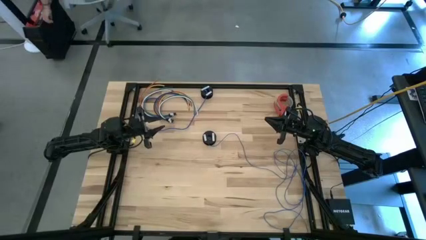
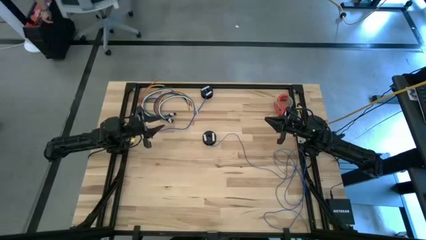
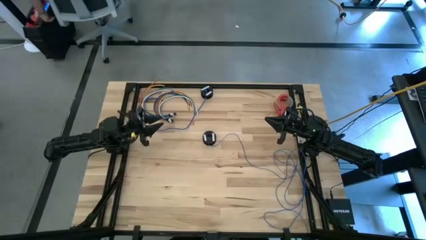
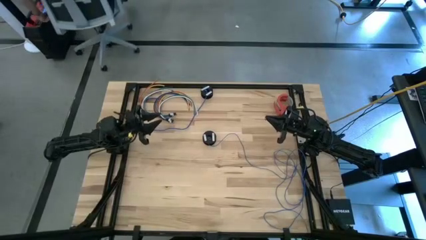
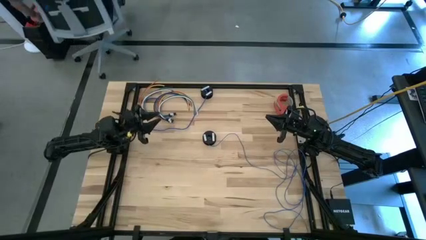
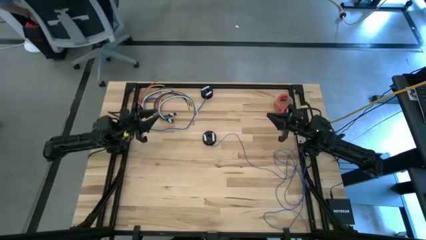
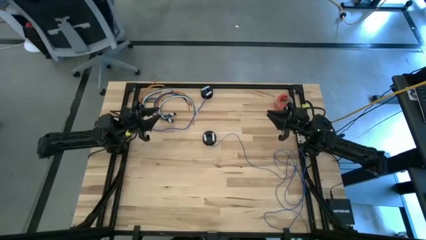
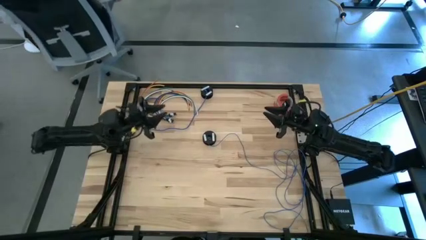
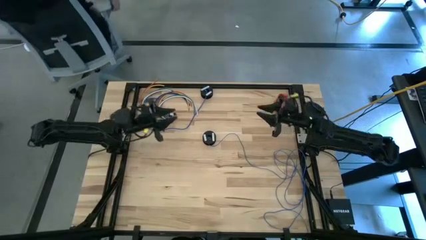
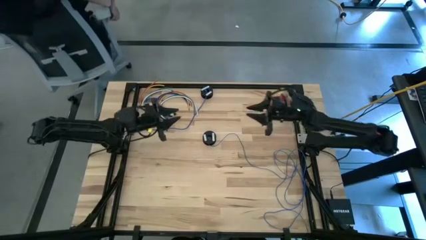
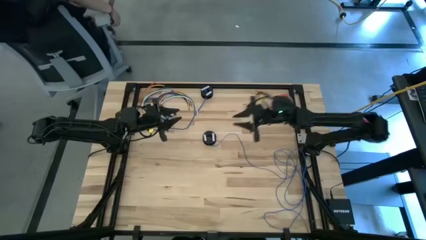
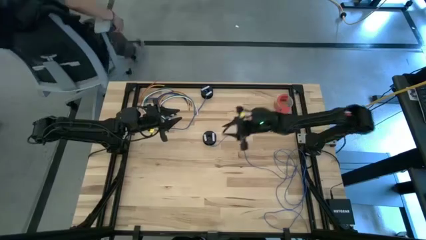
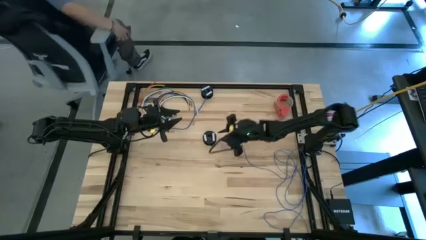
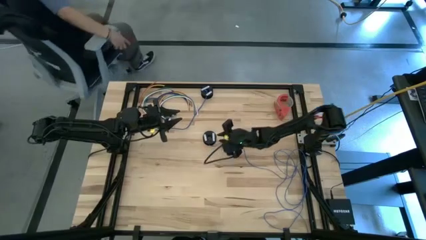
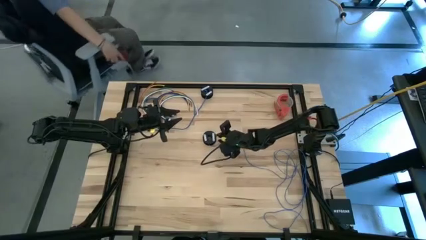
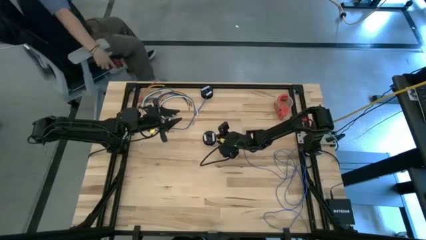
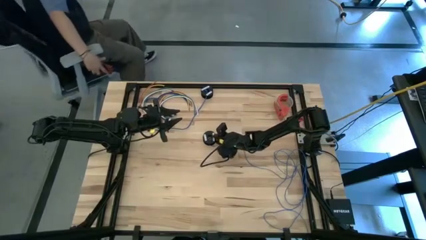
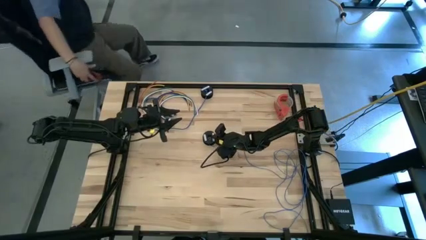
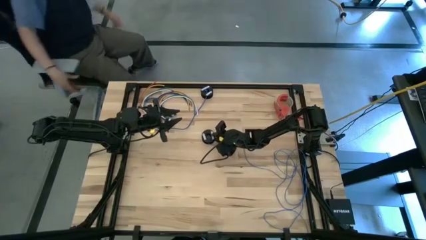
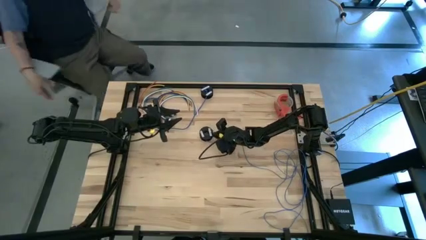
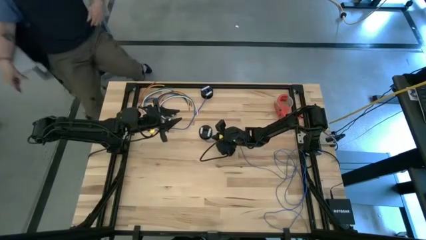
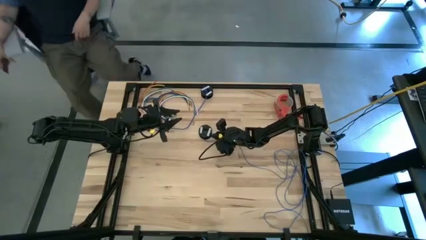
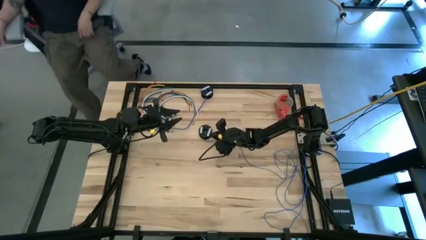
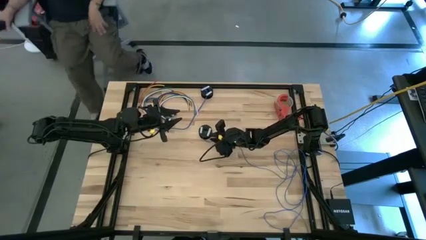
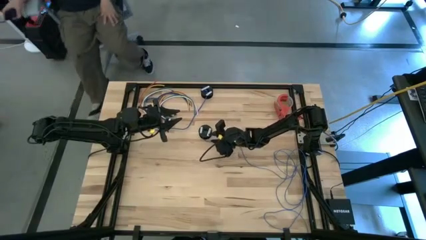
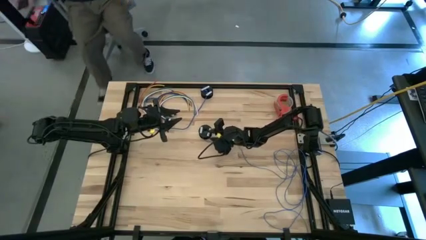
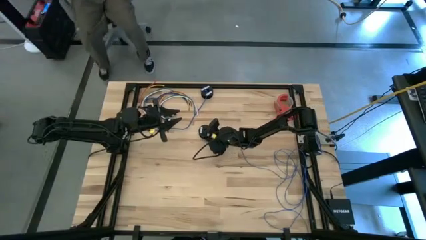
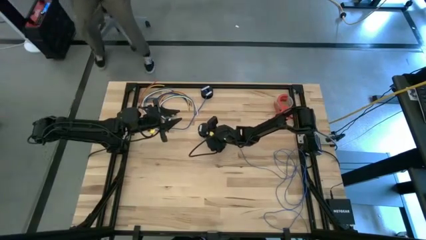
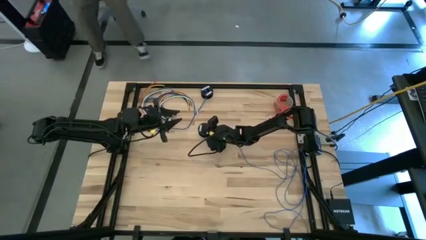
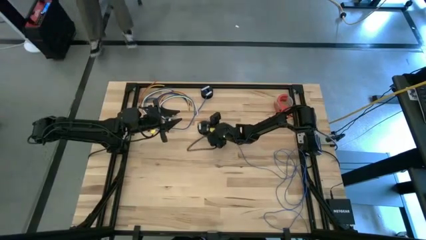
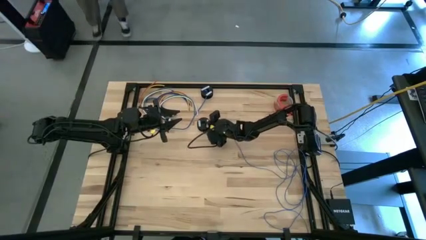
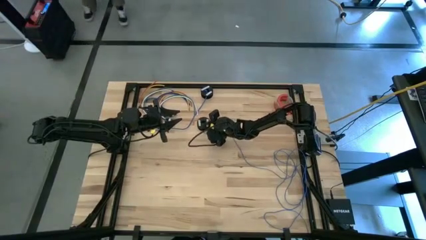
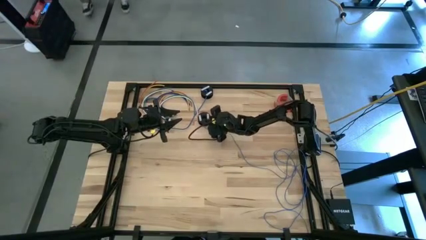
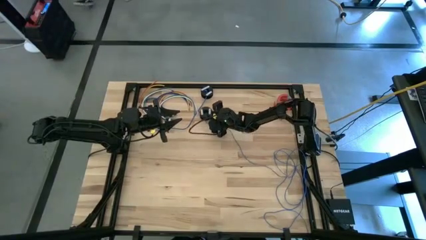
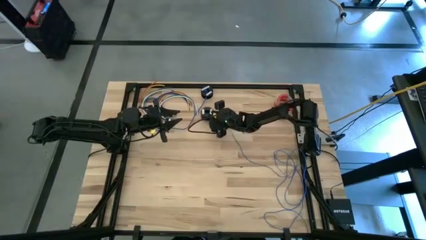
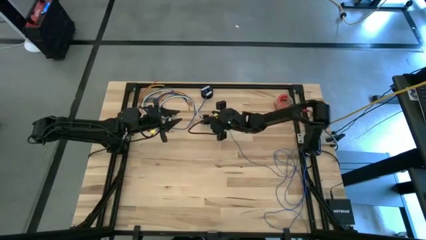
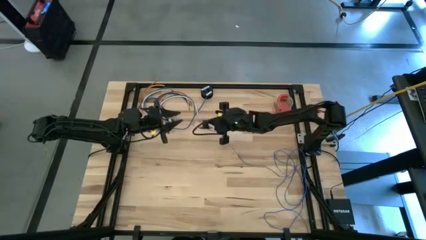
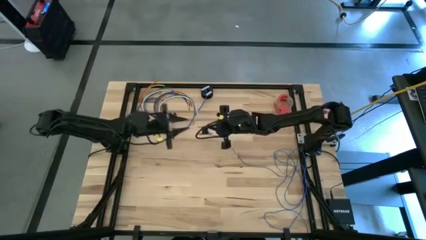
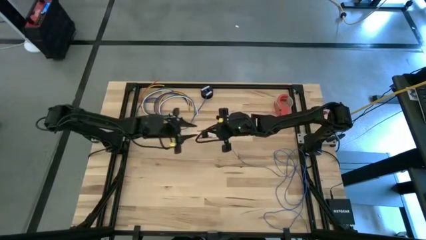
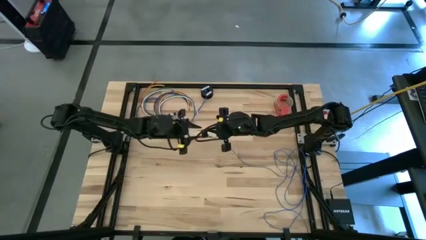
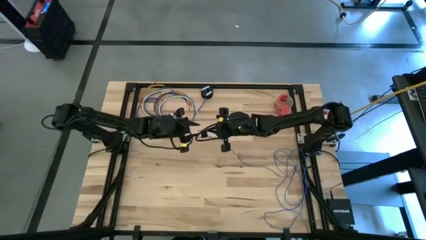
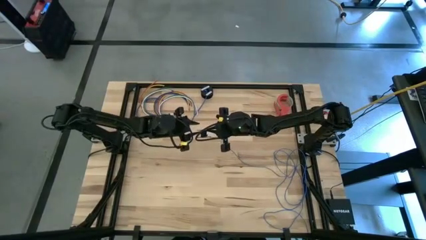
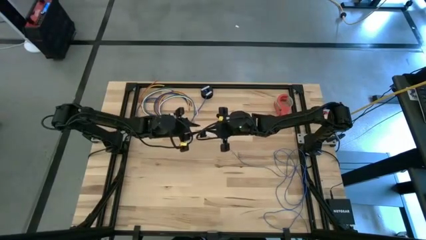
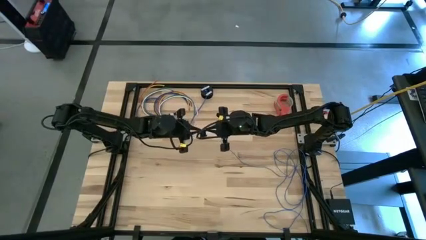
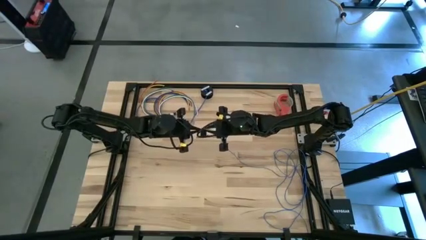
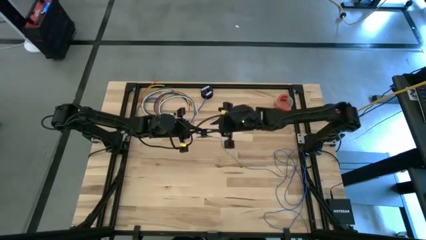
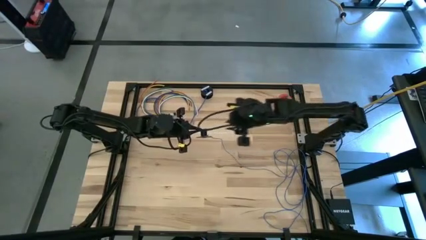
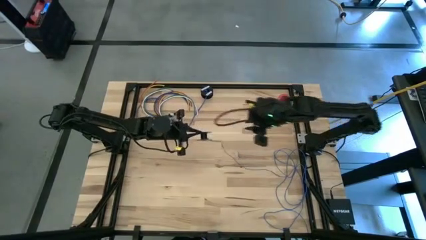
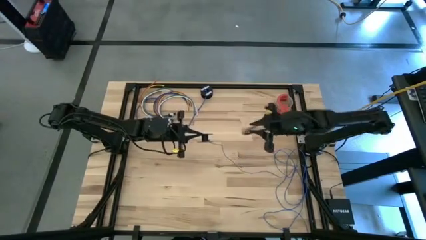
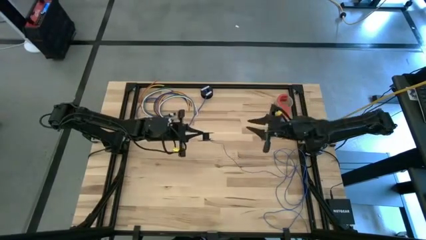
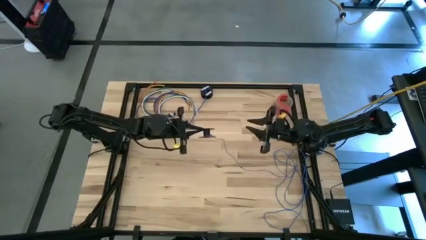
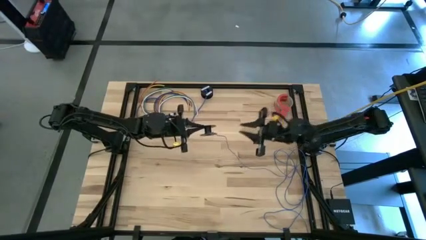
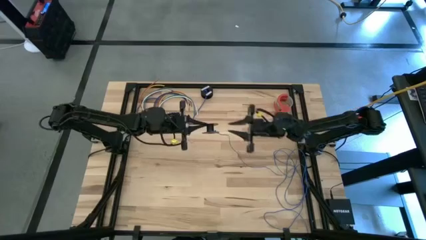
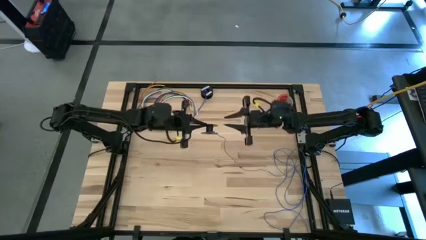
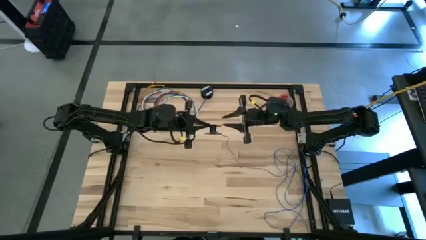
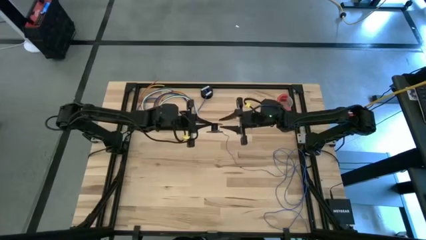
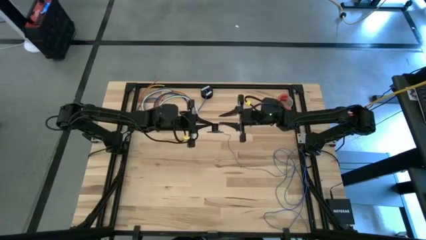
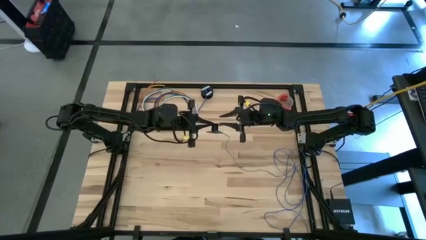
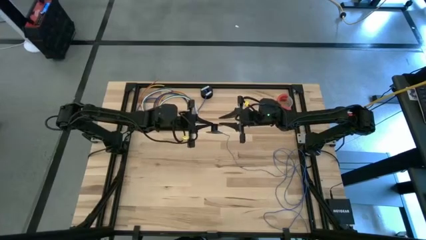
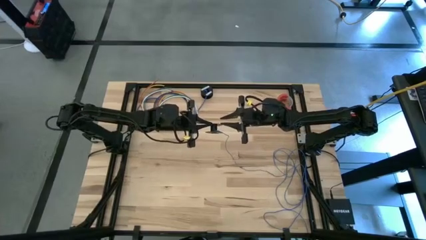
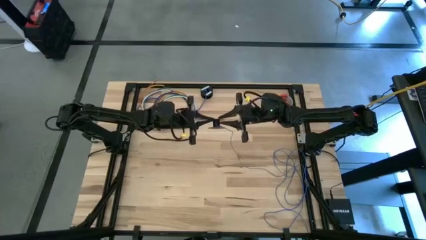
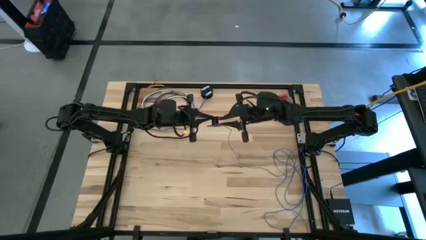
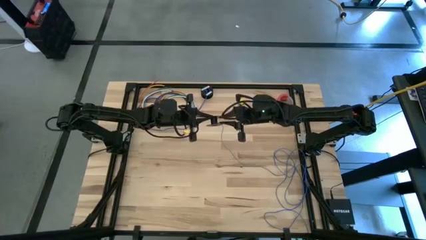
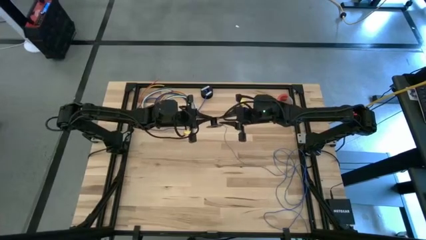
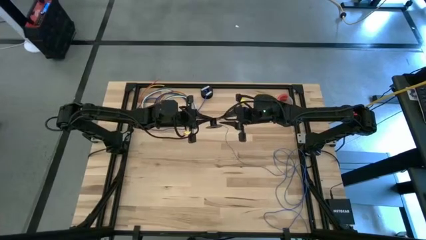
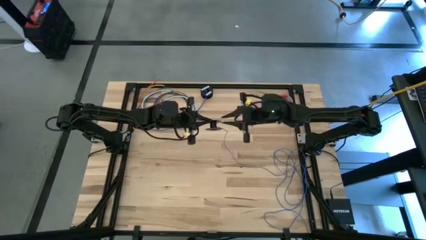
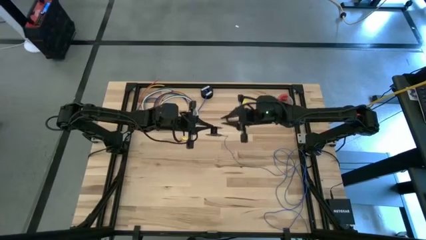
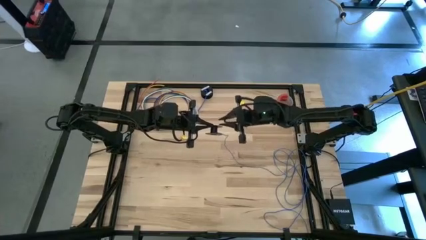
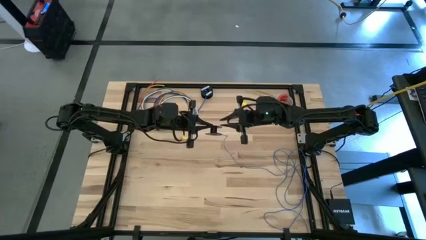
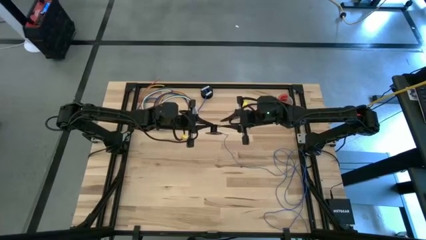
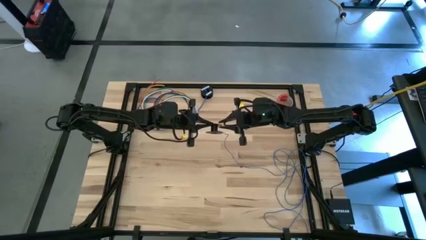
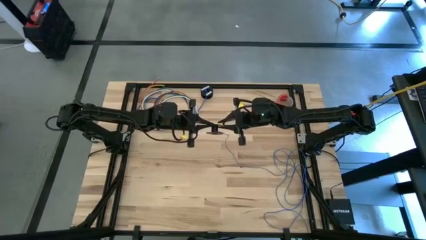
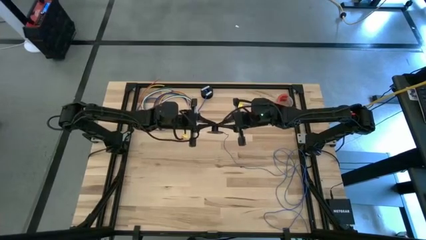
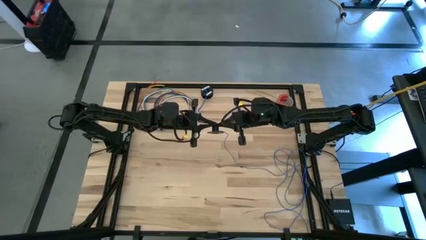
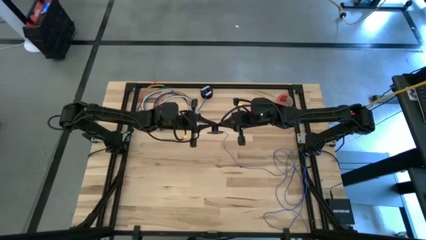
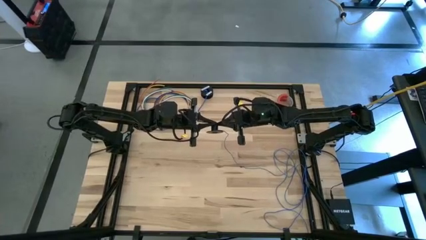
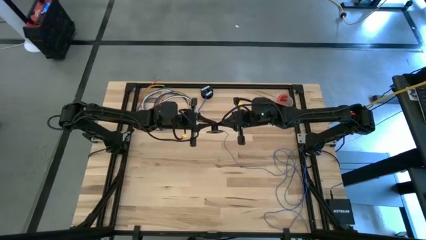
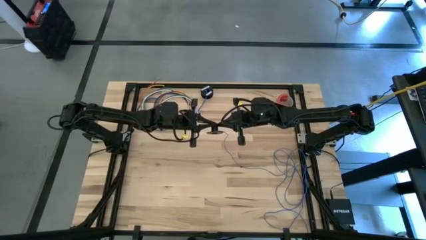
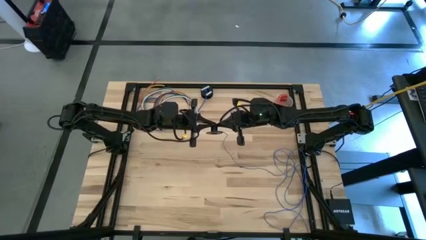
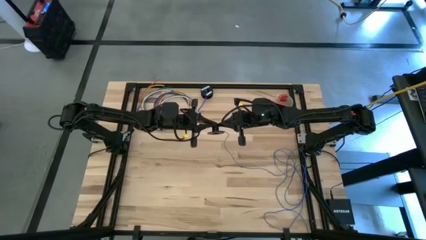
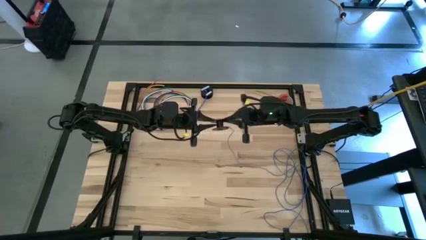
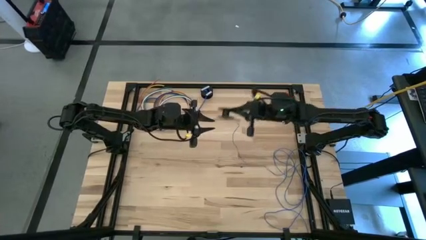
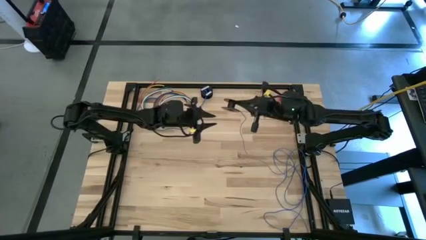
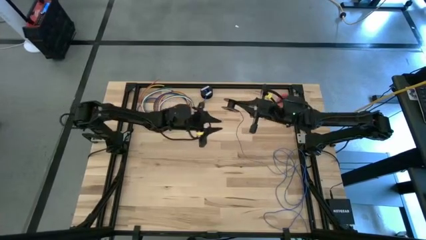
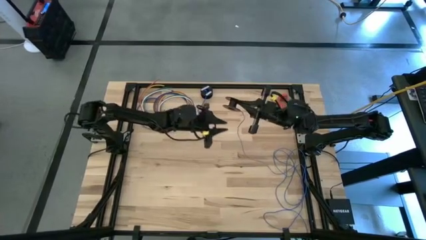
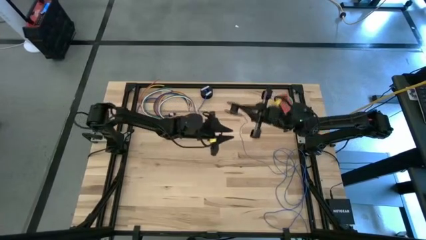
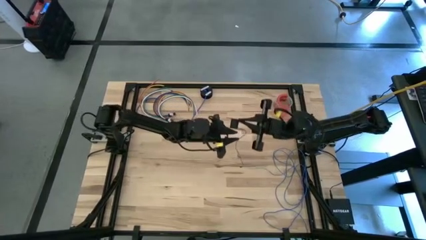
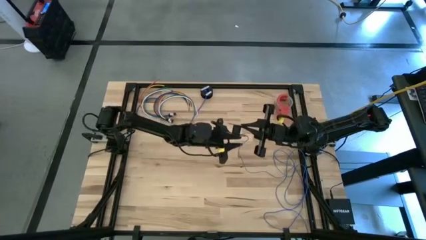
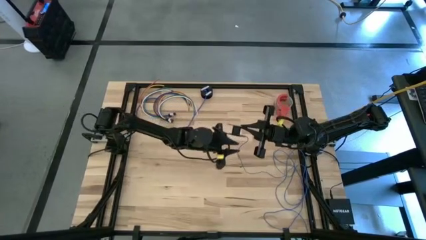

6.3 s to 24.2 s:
Task: Coil cords
Coil the blue wire onto the black spool
